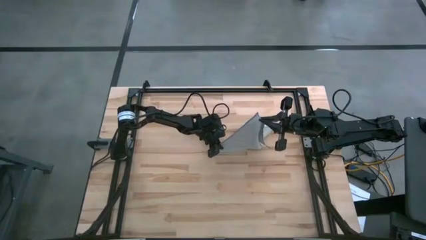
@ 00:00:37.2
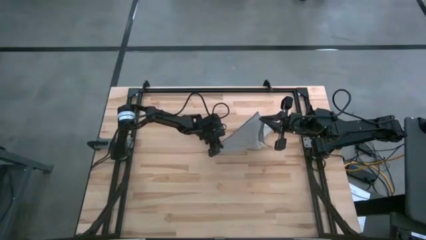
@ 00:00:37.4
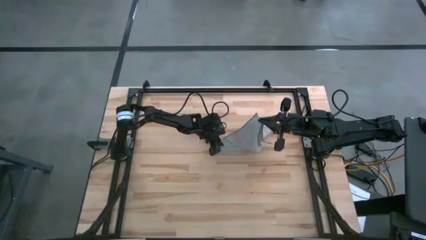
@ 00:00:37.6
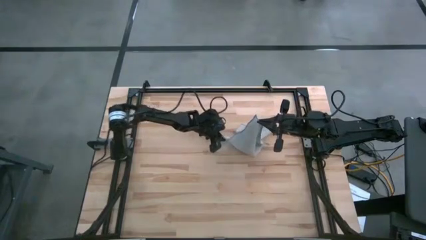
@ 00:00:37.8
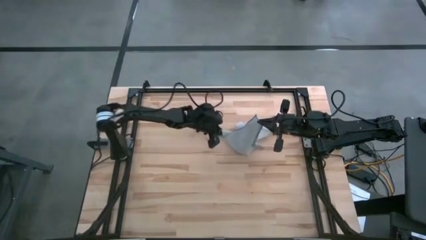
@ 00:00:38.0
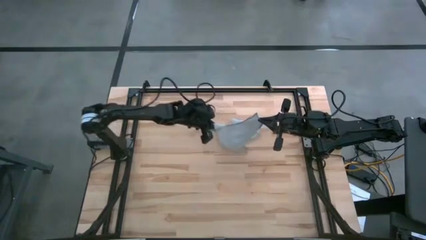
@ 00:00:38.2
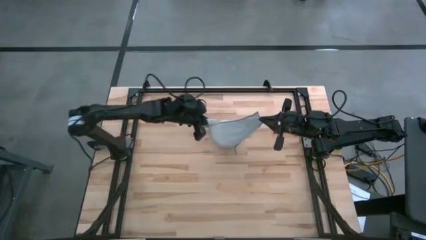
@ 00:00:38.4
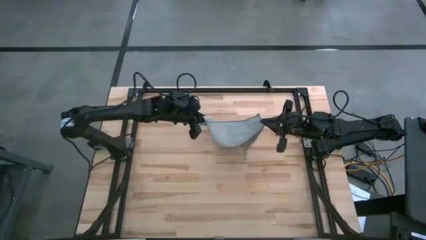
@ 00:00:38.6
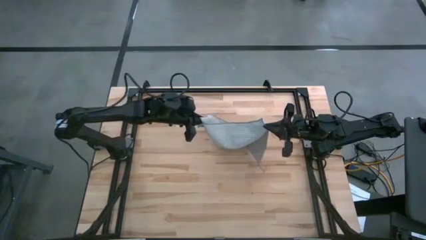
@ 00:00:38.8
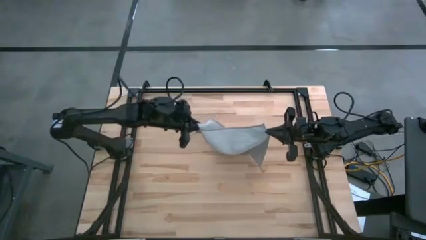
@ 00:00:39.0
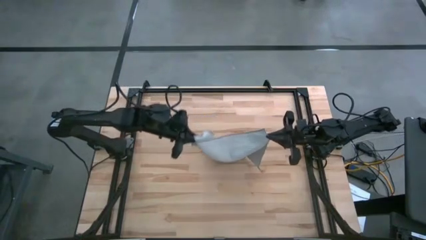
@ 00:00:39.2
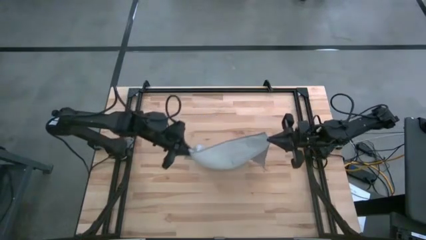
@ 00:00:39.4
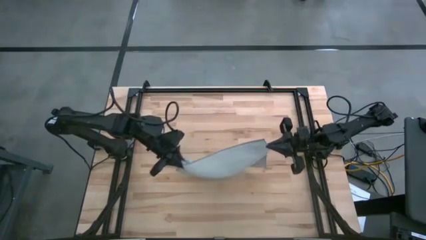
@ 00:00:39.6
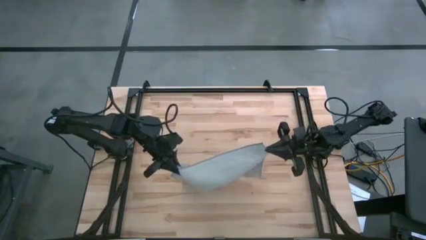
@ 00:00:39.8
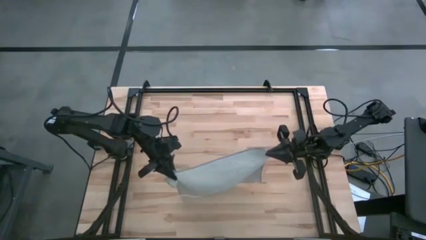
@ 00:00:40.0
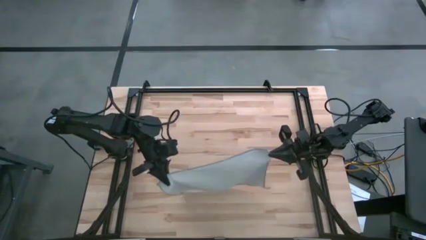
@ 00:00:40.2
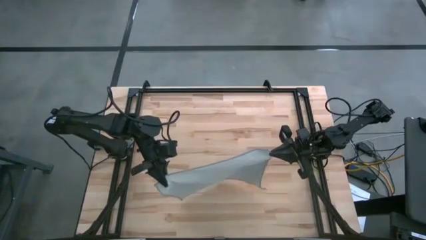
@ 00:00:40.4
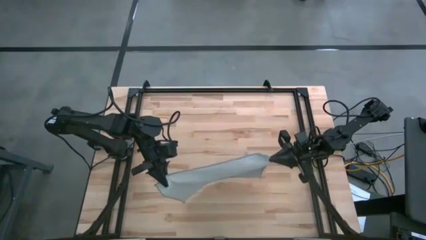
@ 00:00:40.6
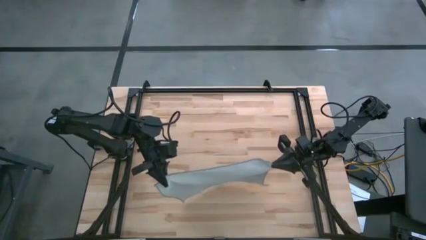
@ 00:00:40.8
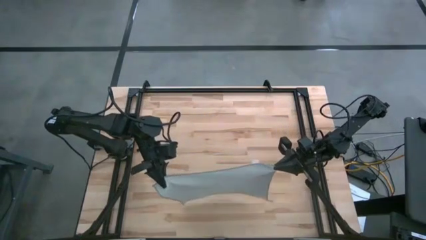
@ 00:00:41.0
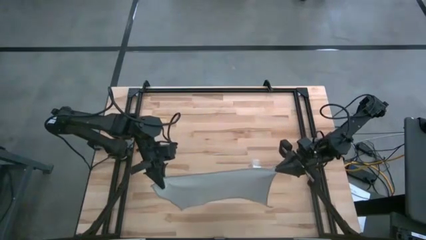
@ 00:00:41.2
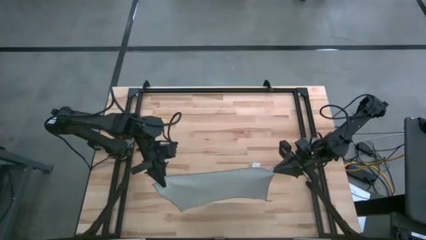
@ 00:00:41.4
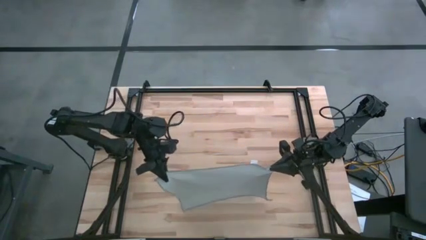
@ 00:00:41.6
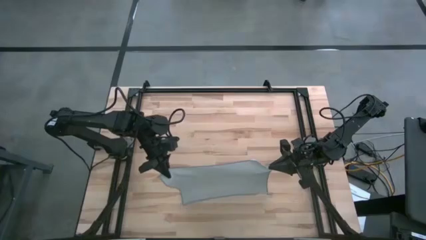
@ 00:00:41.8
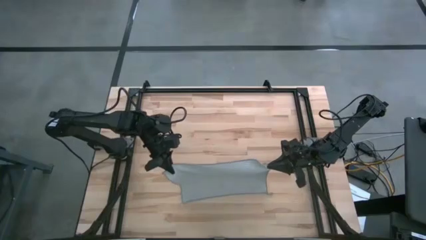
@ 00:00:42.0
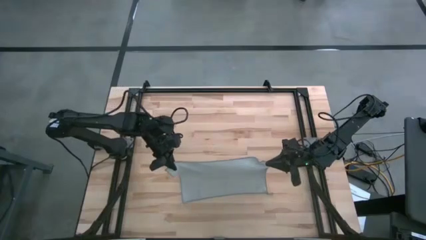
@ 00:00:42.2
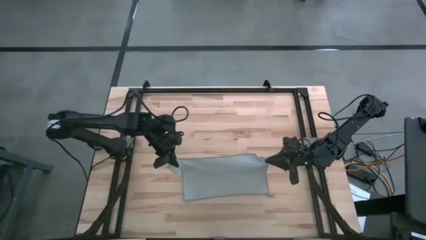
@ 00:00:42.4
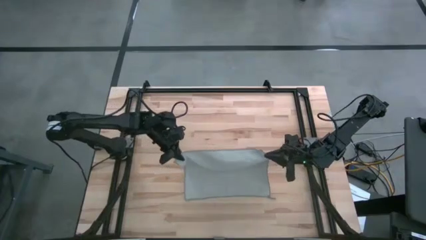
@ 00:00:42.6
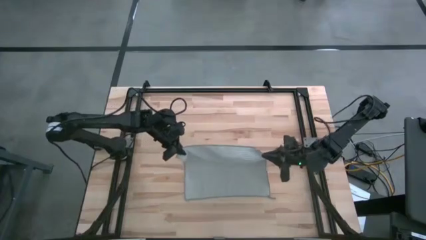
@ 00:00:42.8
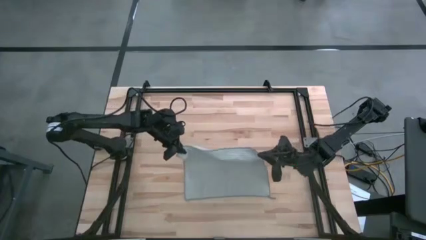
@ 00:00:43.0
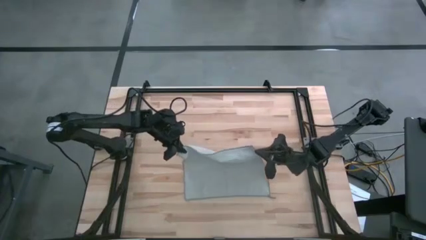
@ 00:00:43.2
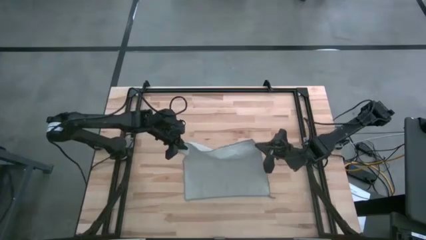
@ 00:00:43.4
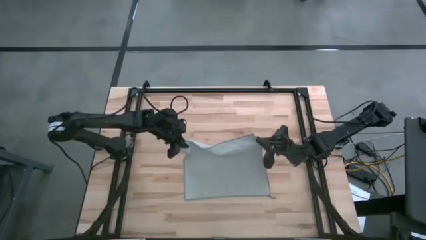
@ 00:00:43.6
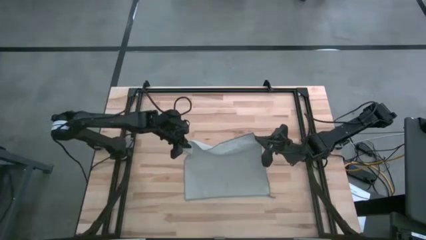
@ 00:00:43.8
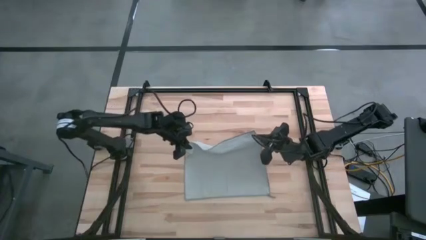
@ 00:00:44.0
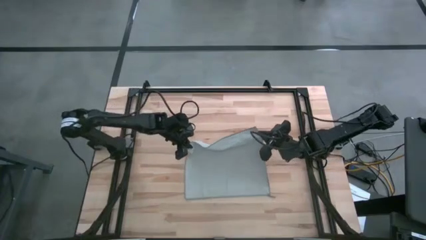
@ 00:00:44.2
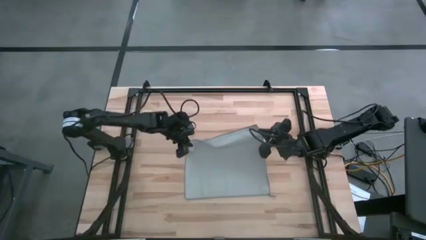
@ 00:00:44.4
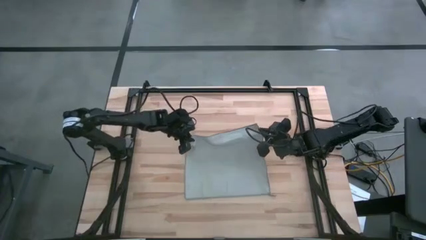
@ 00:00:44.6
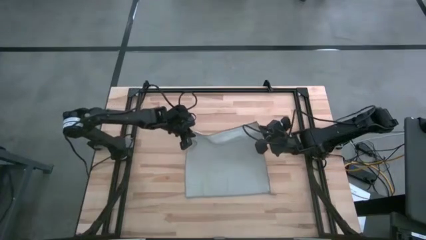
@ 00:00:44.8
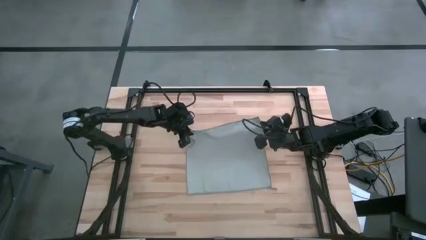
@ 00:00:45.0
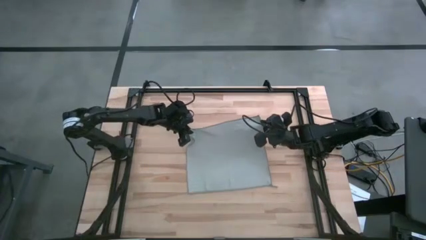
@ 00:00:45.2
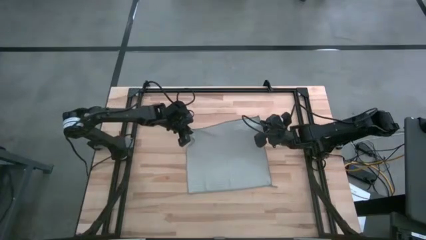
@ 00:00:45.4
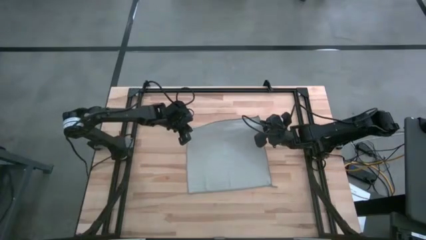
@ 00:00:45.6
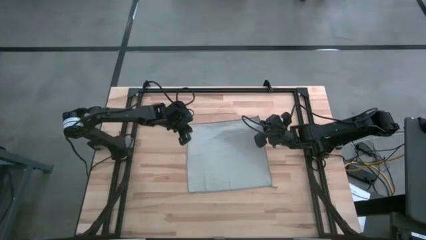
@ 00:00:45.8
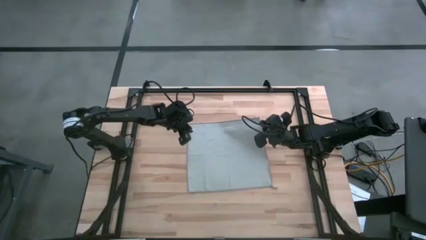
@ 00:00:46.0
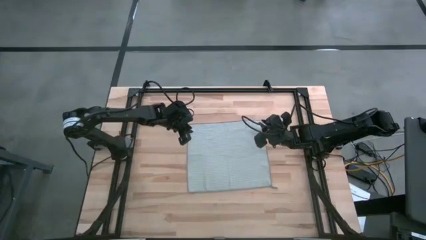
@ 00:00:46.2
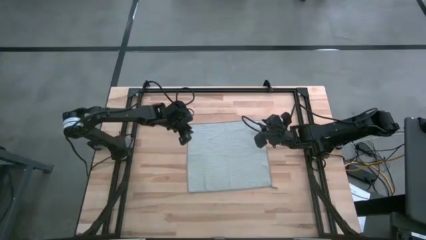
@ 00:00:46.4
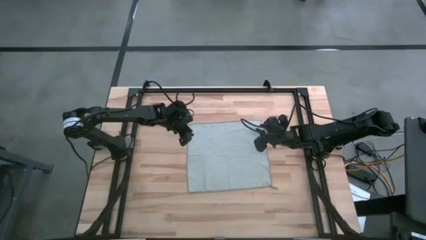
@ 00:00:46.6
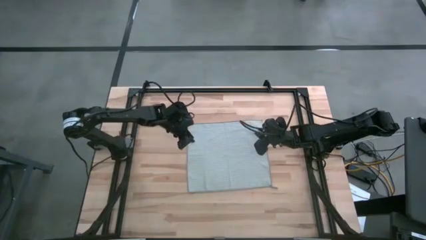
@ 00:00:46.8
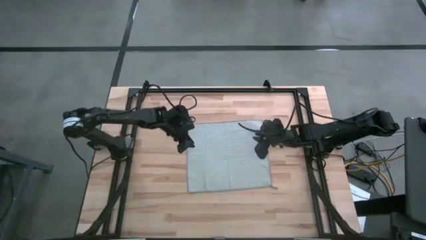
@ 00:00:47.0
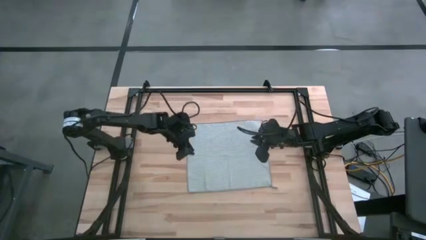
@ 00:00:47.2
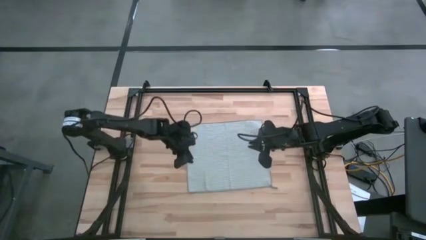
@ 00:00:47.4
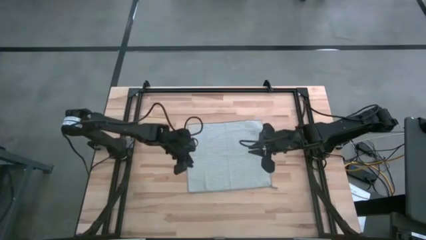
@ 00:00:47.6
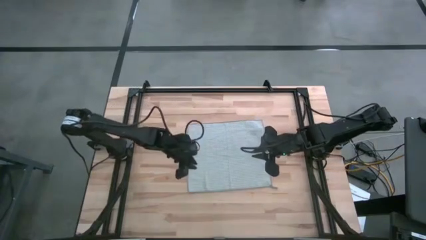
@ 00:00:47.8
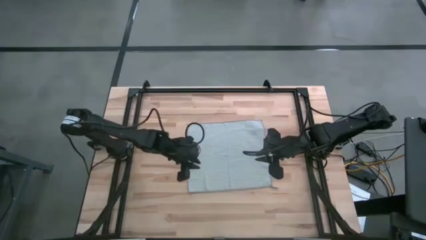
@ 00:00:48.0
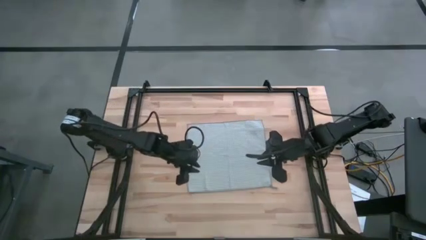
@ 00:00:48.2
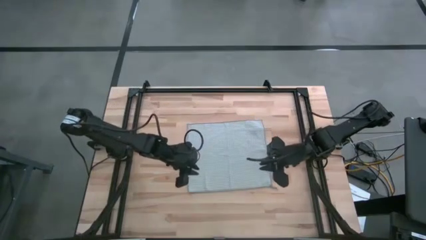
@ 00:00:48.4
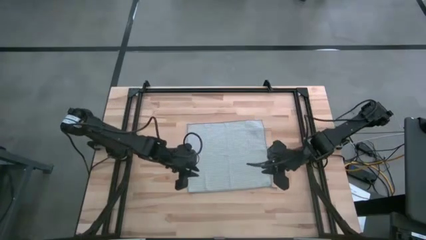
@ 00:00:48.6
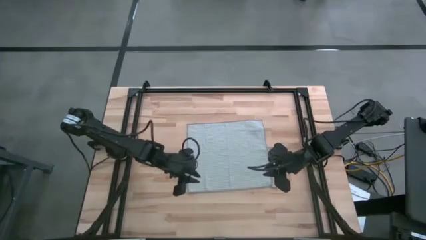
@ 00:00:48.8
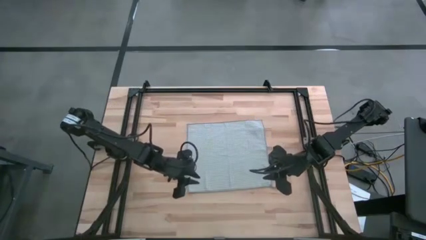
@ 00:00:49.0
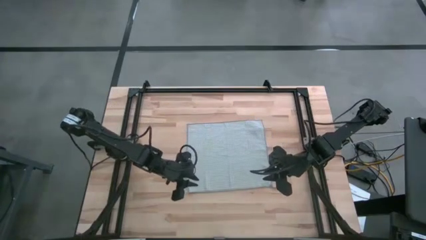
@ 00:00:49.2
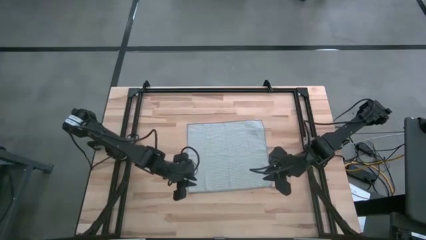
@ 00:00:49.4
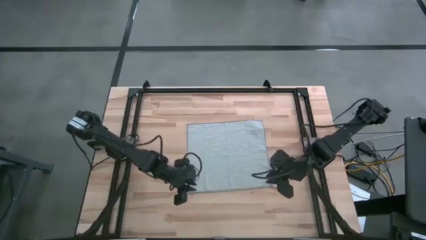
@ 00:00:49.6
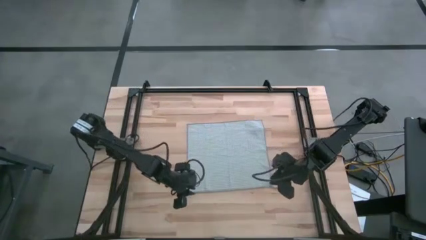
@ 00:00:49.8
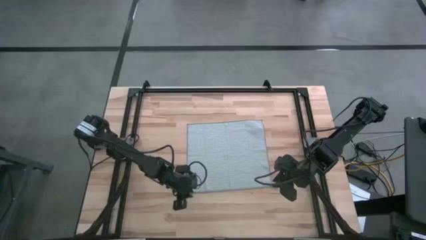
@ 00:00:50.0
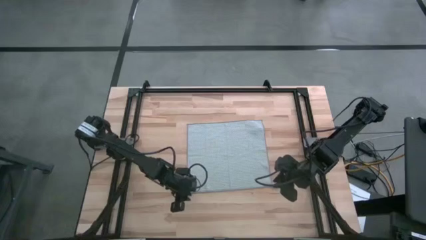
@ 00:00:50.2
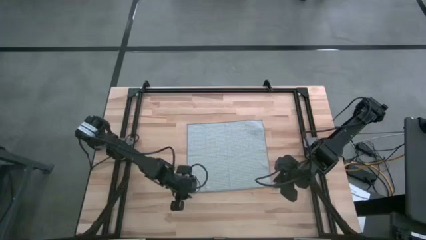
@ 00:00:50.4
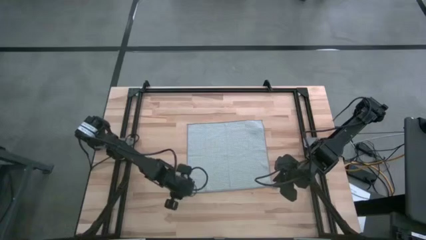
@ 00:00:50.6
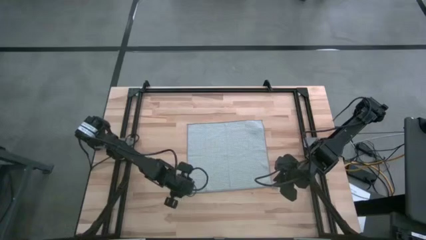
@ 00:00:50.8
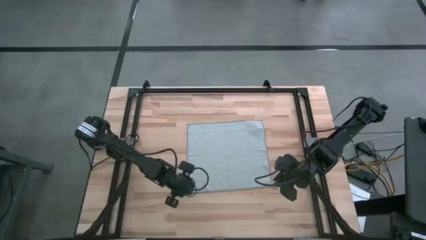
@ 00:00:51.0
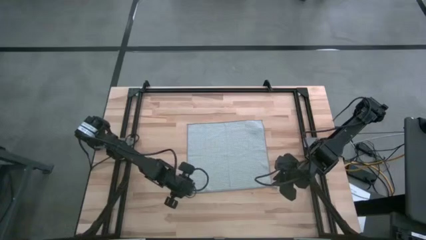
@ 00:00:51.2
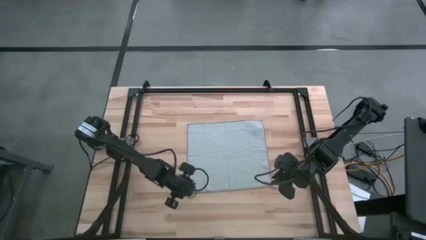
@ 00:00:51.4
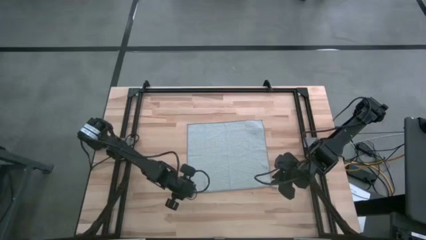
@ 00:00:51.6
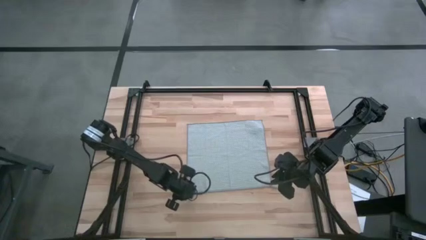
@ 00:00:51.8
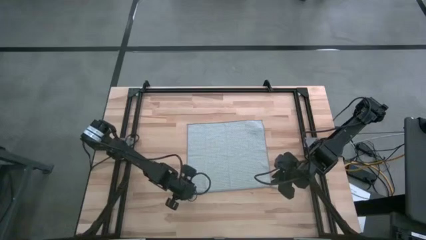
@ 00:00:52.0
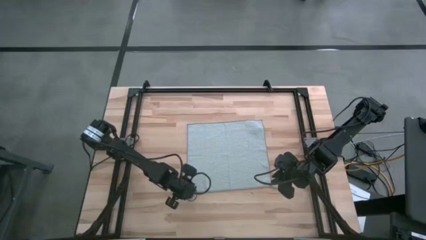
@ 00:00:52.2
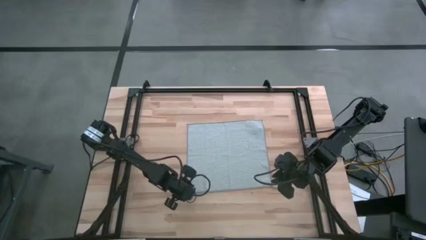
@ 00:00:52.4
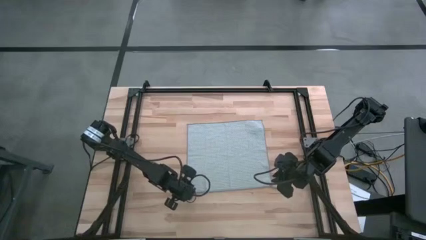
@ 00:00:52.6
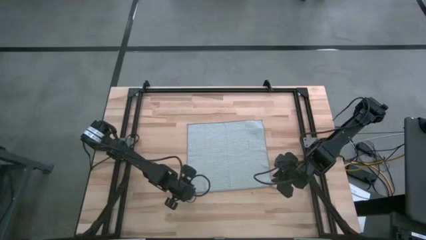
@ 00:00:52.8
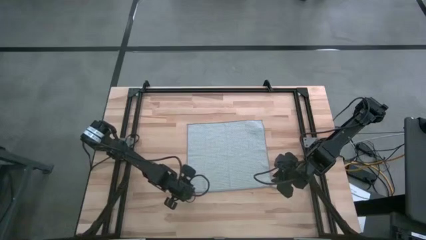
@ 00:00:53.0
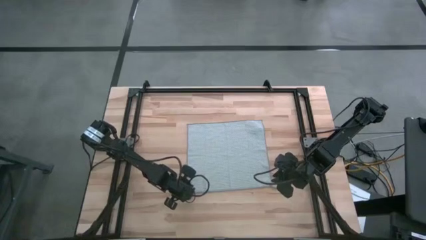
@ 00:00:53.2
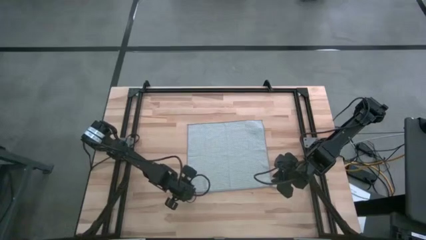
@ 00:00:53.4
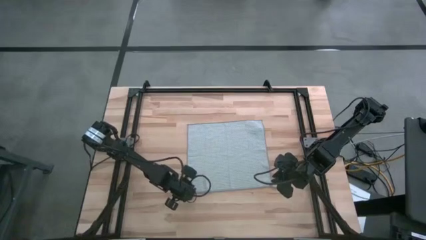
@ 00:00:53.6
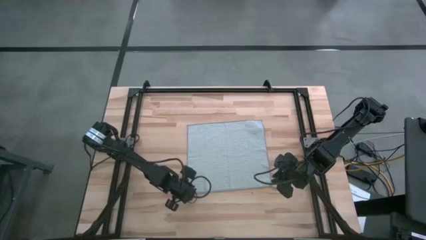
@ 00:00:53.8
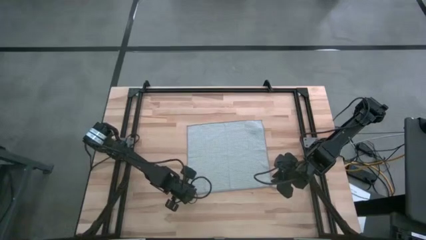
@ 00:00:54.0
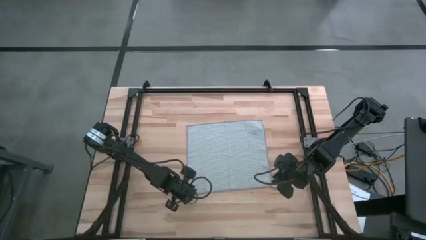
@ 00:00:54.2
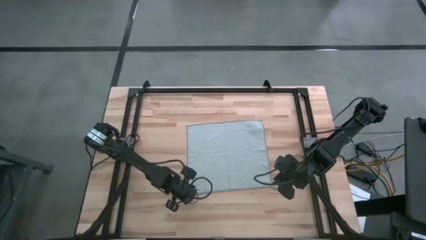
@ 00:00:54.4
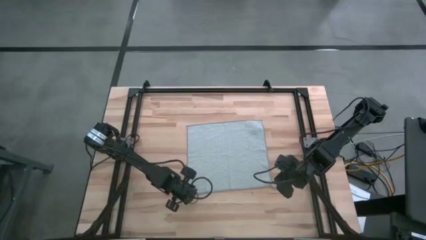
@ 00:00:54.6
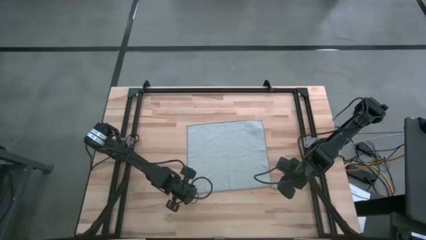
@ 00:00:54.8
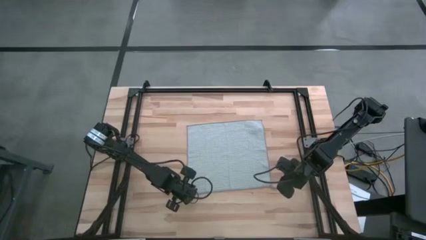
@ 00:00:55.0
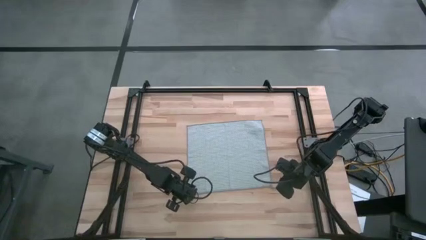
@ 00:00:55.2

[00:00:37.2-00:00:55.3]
Task: Fold microfiber towels
Fold the gray on the table
